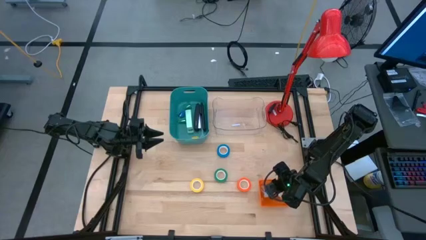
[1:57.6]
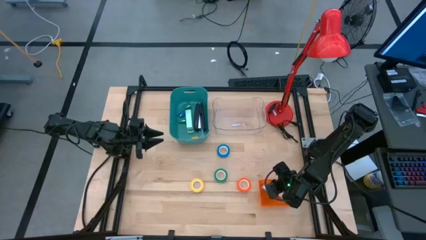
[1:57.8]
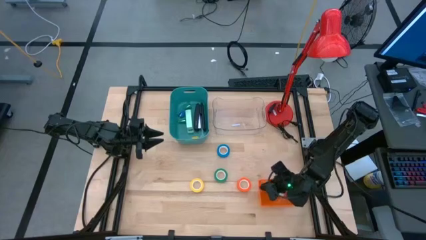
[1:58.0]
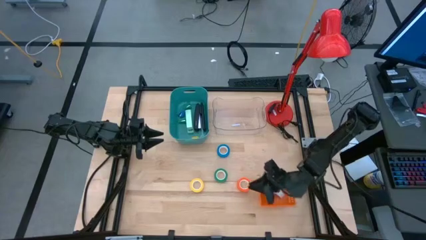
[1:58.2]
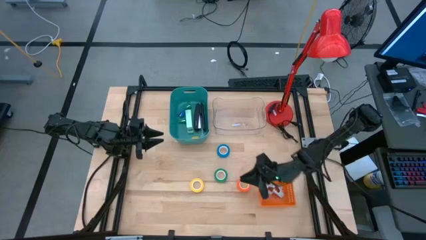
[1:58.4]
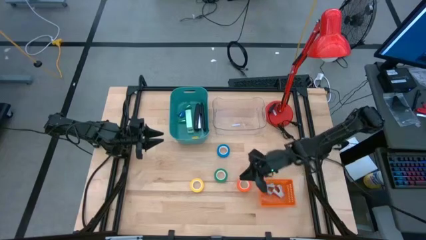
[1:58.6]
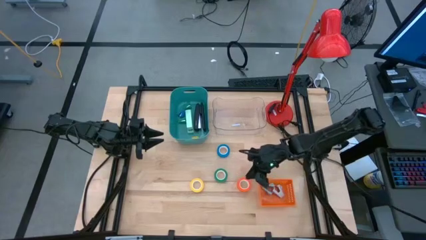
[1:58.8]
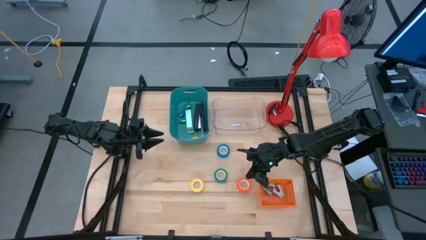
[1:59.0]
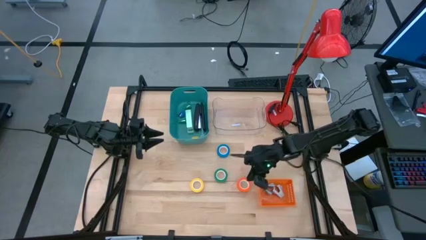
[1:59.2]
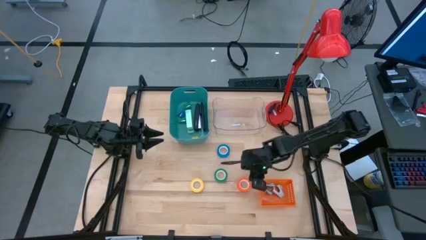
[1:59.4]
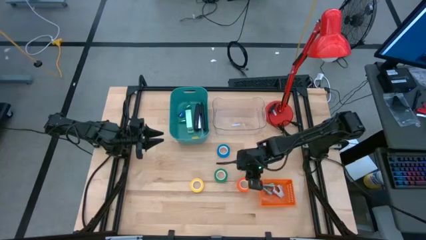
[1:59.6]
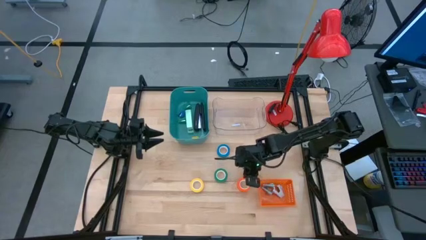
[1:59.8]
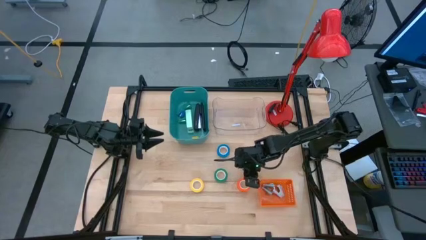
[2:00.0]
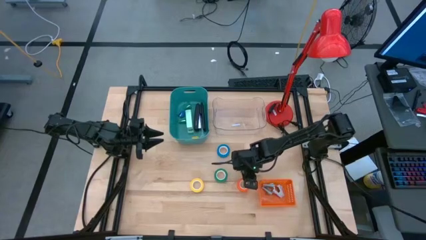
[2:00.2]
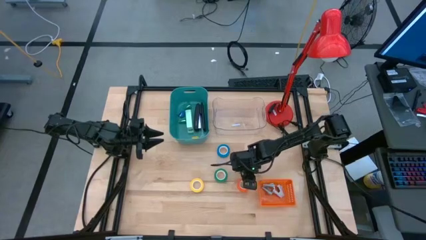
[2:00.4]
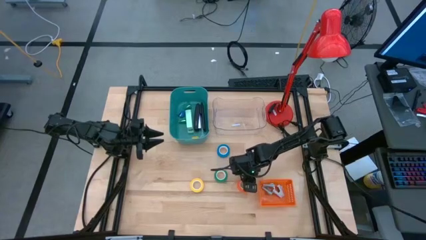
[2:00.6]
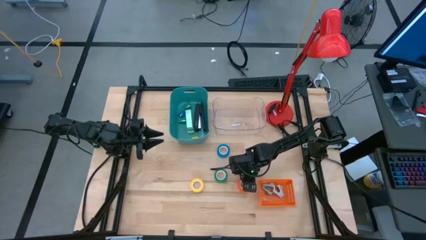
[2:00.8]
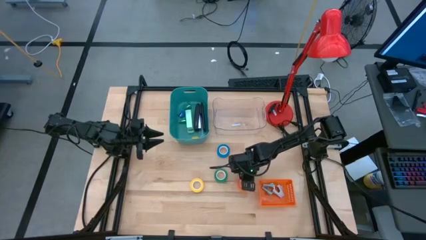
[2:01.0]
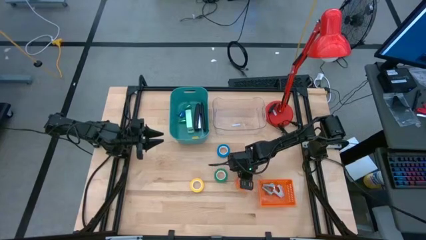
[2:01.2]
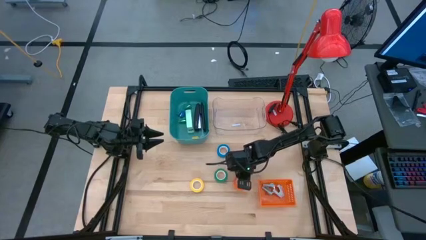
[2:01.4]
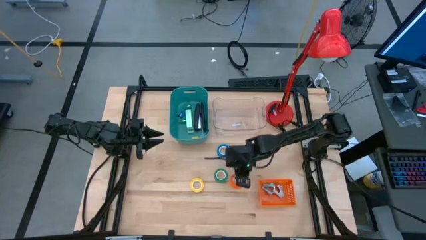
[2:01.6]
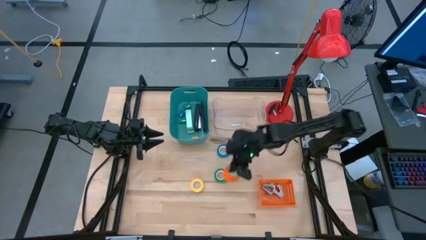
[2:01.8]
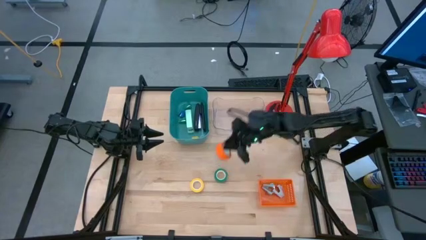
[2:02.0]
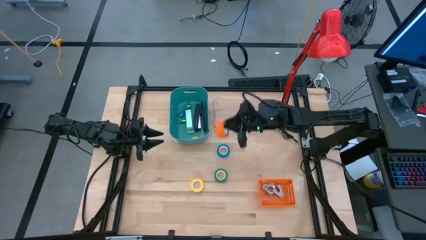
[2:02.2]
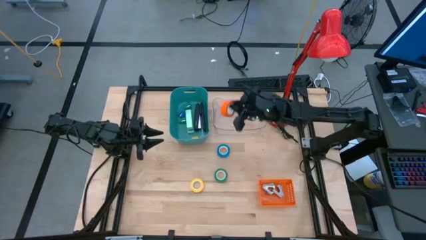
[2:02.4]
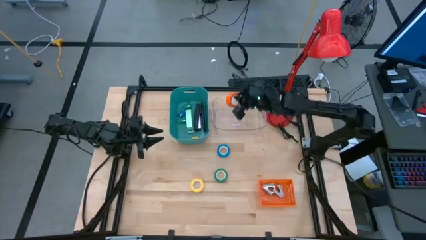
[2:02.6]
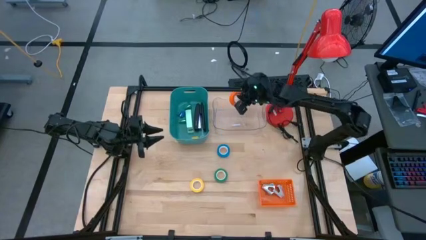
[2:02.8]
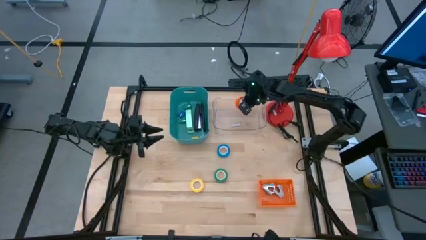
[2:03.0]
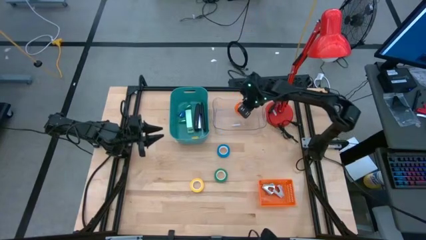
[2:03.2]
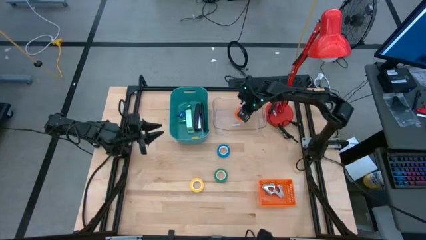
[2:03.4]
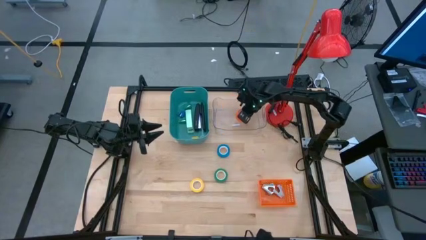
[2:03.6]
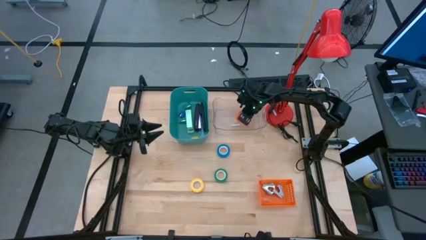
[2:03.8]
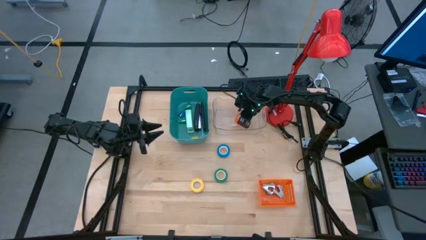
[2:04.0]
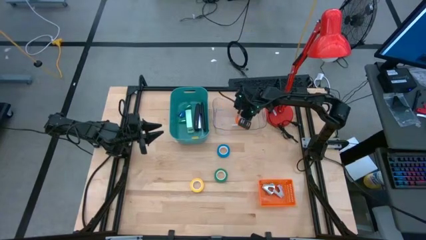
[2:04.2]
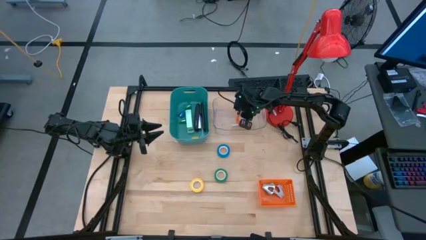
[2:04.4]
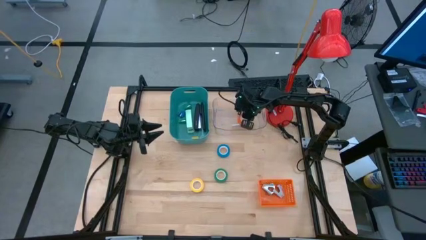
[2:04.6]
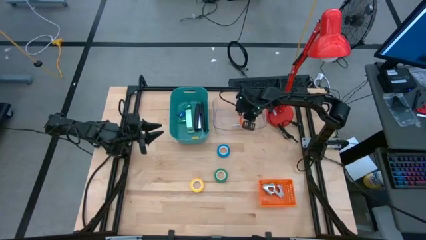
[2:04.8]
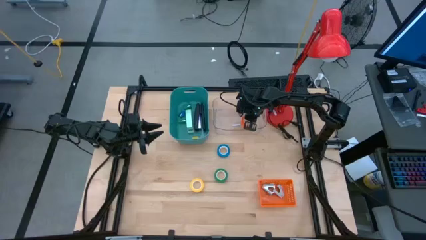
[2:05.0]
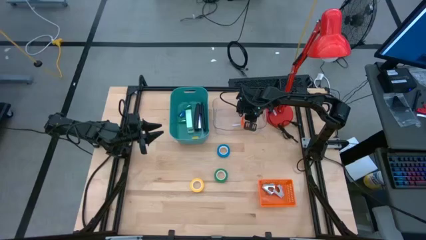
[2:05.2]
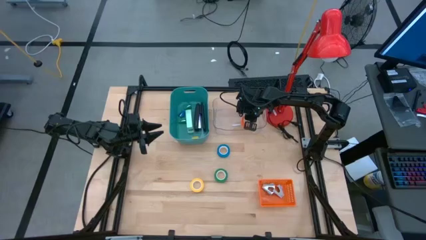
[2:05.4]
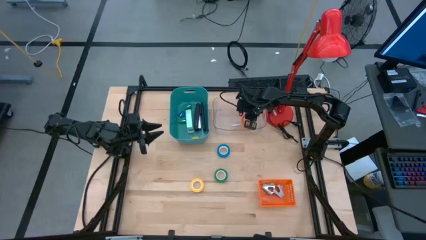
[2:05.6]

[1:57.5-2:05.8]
Task: Pick and place Stapler, Stapler remover, tape
Put the orange tape into the transparent bin

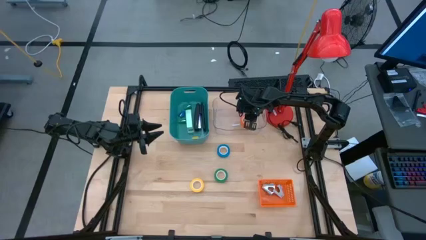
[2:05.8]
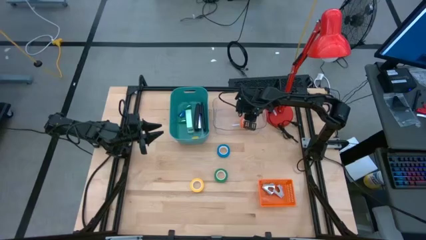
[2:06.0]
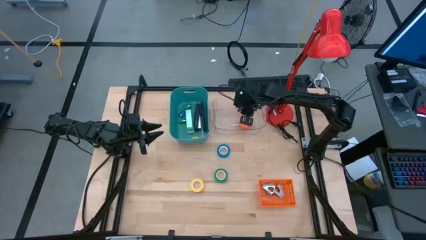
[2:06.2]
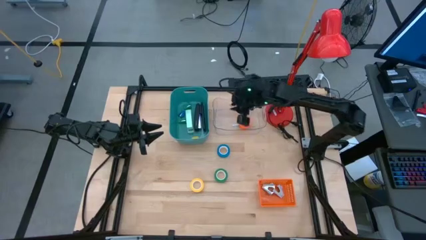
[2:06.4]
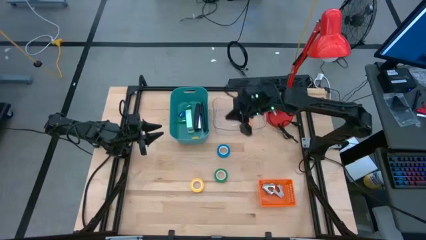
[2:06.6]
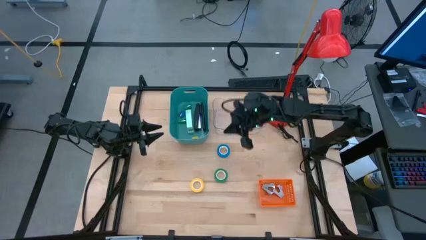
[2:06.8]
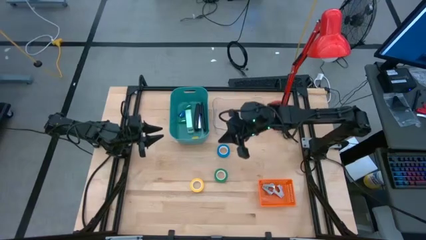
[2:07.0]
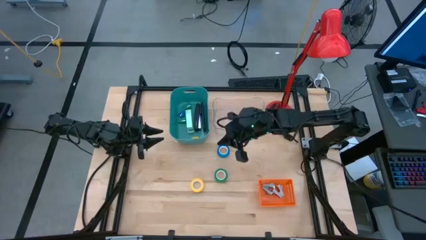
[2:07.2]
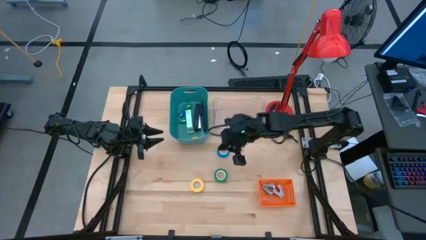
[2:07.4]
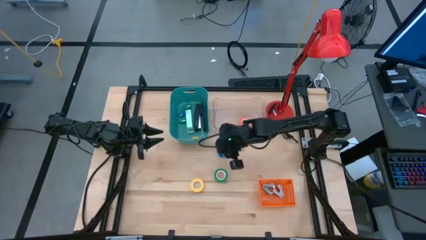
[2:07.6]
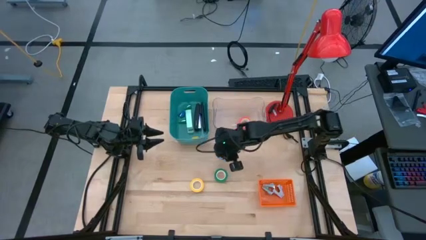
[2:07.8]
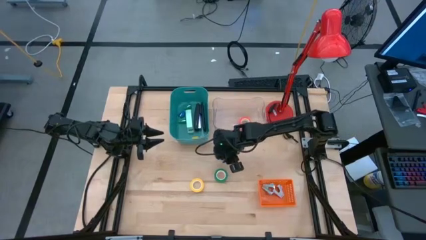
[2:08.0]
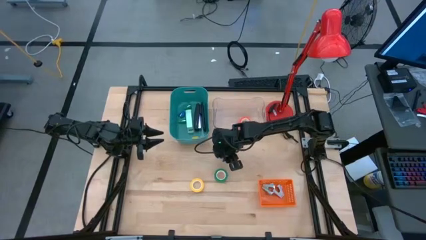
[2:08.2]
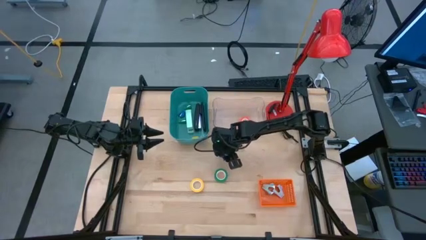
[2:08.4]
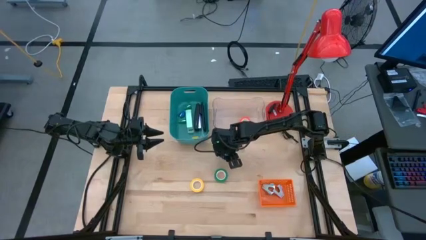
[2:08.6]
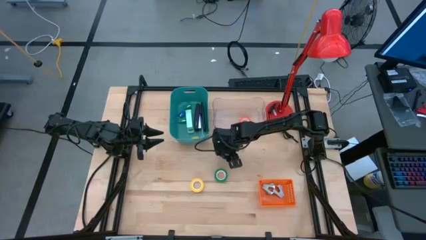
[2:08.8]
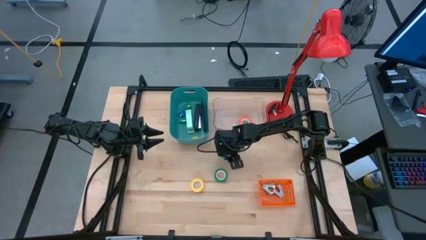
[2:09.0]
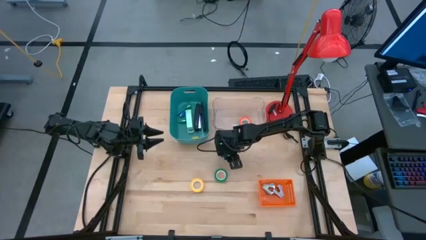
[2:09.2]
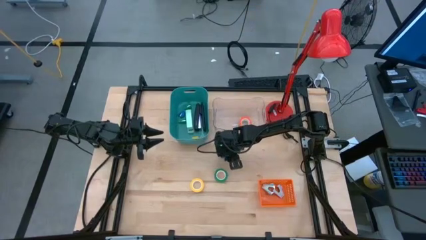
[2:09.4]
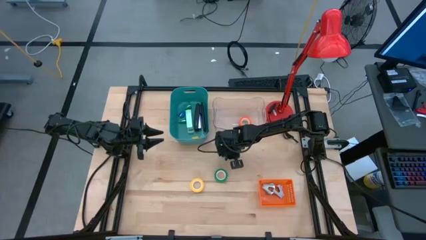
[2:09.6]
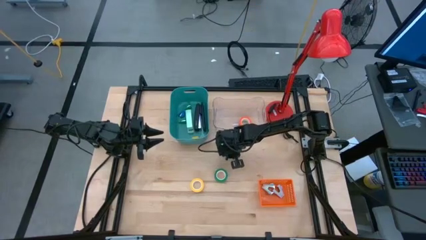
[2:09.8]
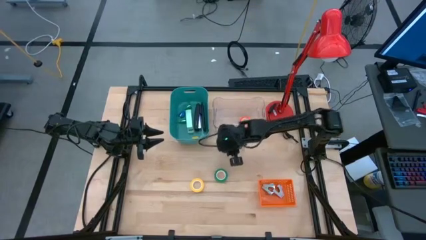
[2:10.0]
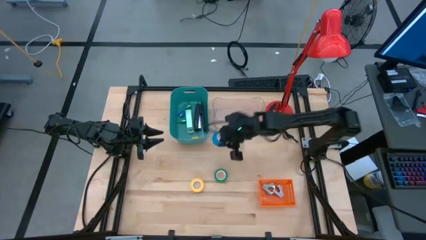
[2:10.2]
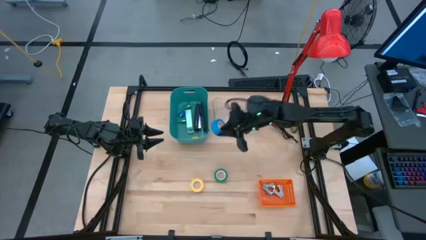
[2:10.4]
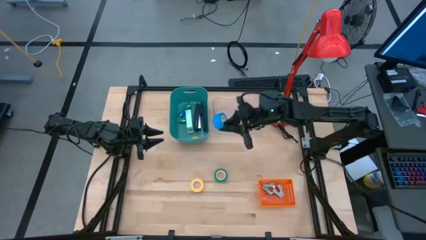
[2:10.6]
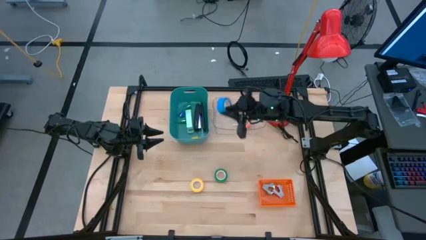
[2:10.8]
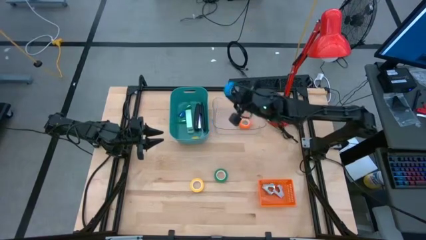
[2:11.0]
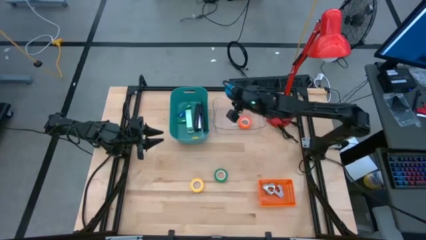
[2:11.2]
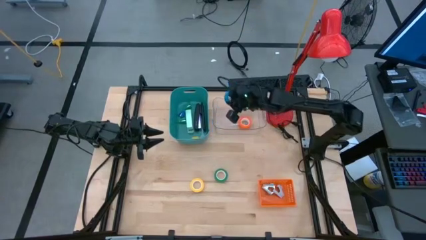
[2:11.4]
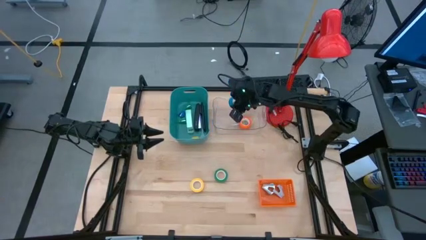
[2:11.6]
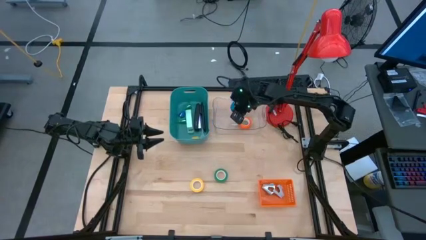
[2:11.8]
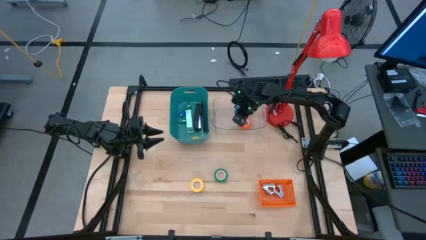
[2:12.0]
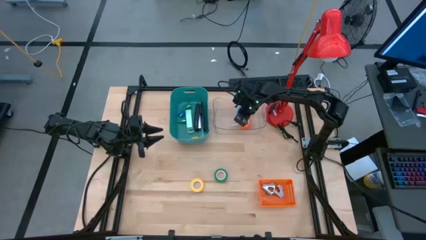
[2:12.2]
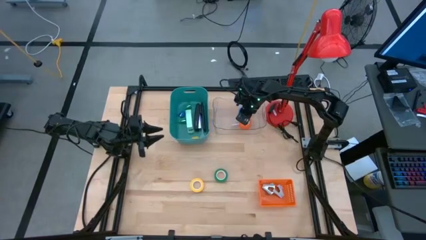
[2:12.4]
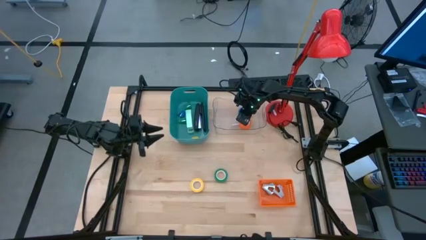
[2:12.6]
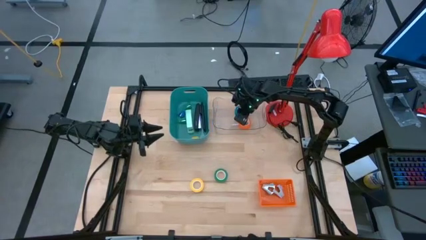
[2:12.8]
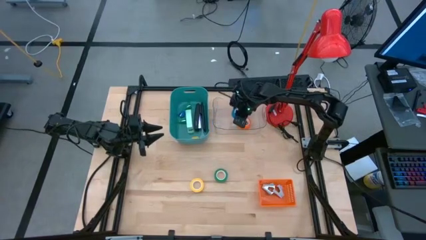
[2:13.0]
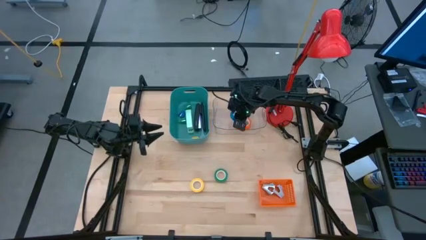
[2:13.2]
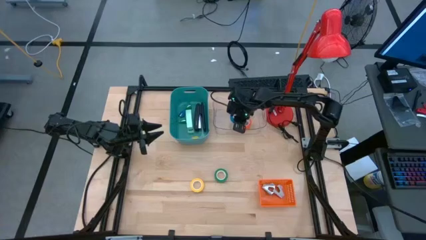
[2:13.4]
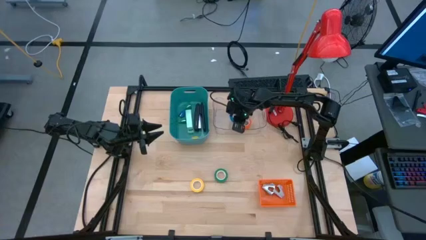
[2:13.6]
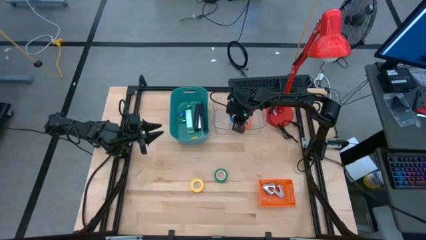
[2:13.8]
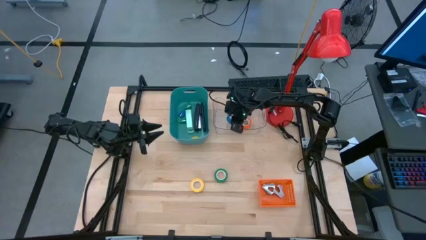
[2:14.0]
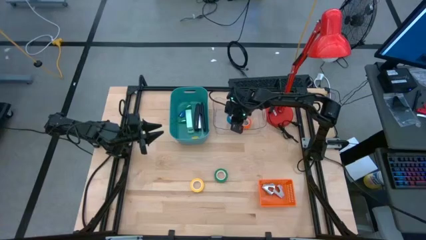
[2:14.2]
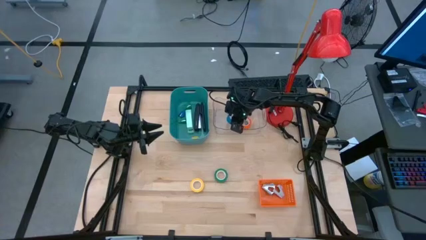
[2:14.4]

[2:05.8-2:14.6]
Put the blue tape into the transparent bin
